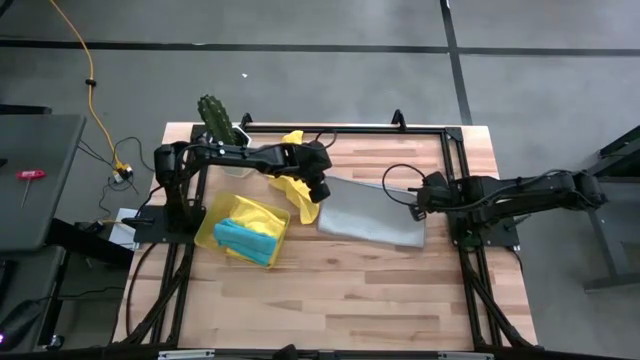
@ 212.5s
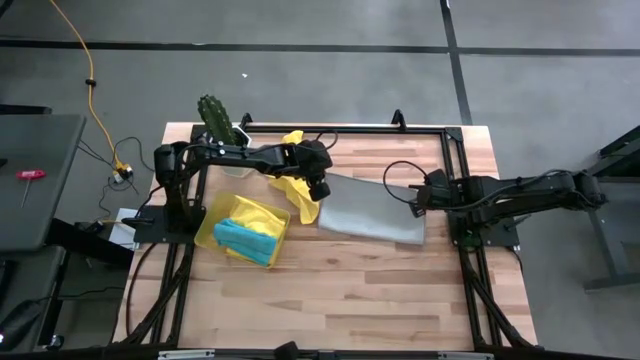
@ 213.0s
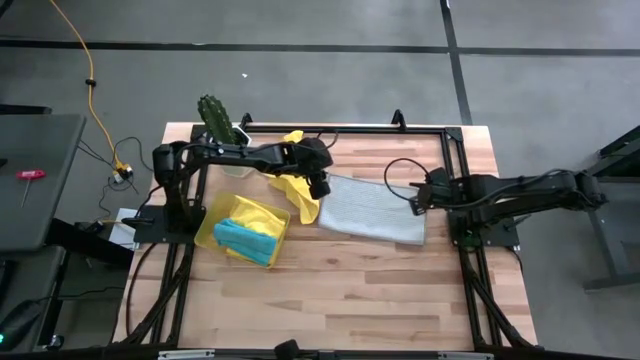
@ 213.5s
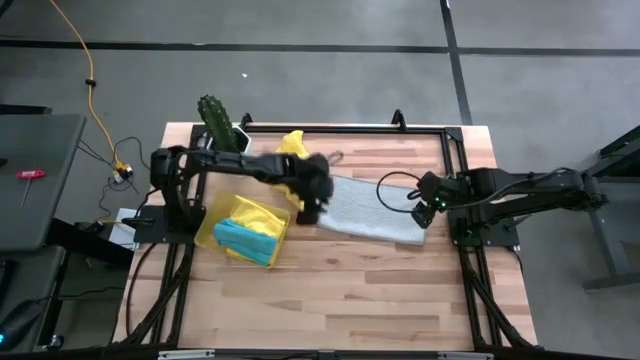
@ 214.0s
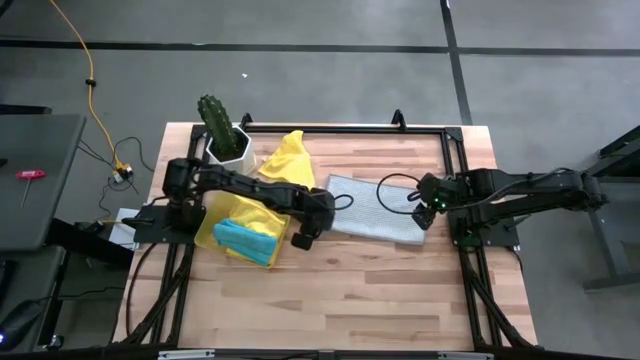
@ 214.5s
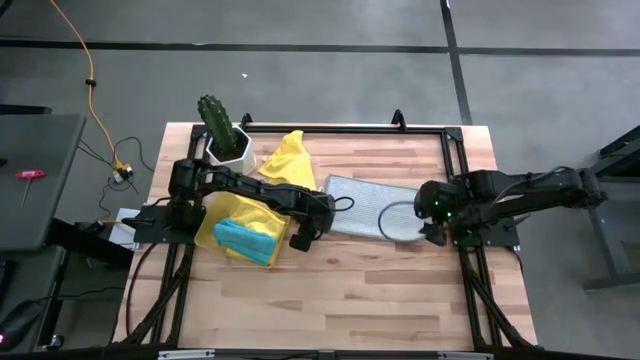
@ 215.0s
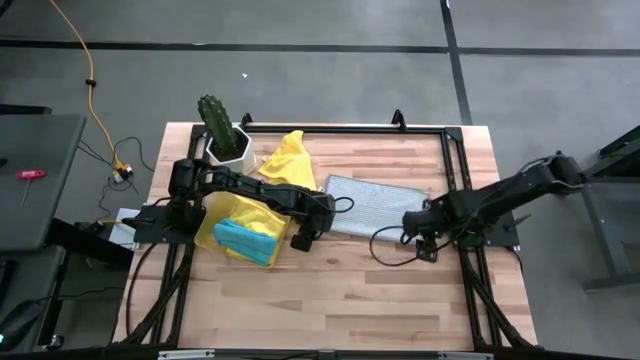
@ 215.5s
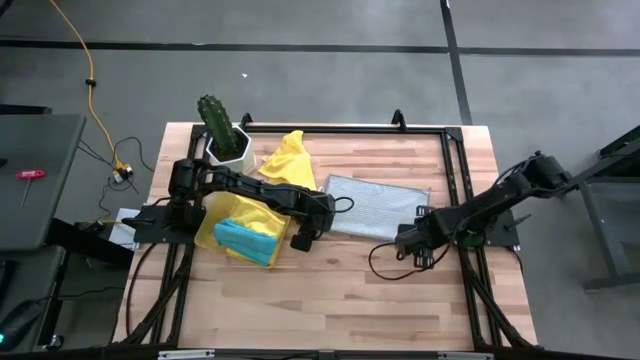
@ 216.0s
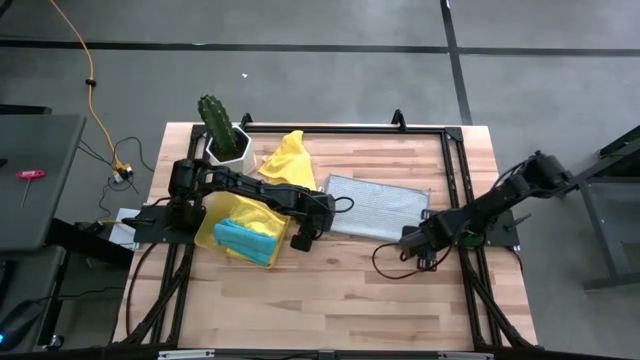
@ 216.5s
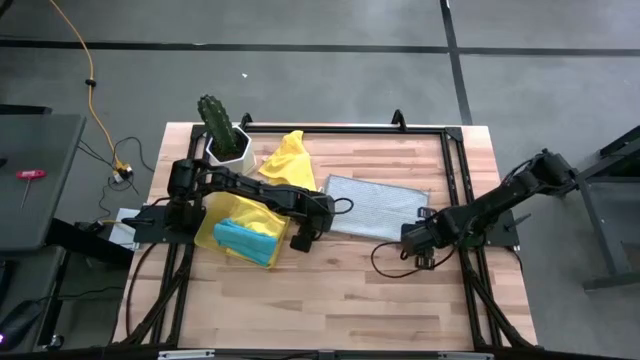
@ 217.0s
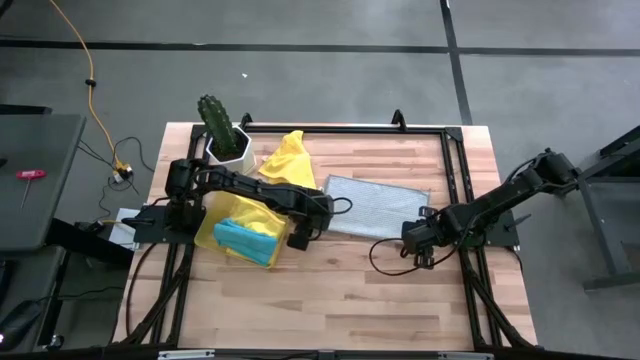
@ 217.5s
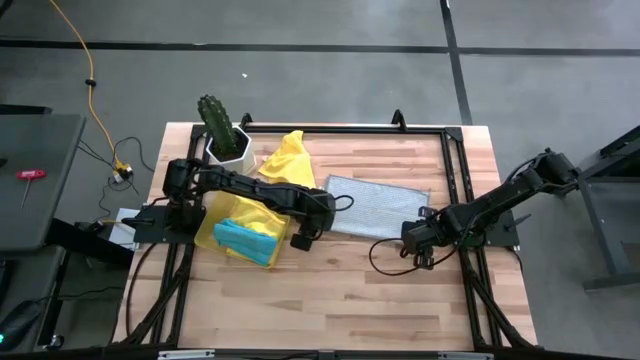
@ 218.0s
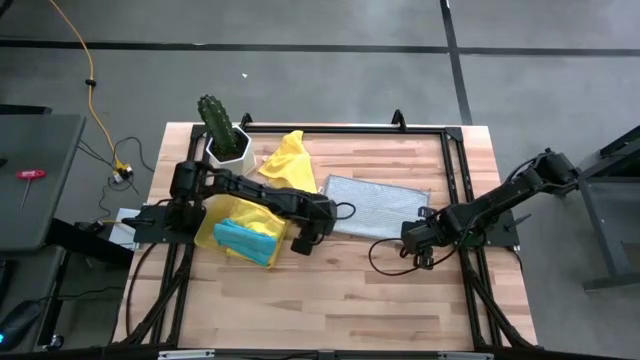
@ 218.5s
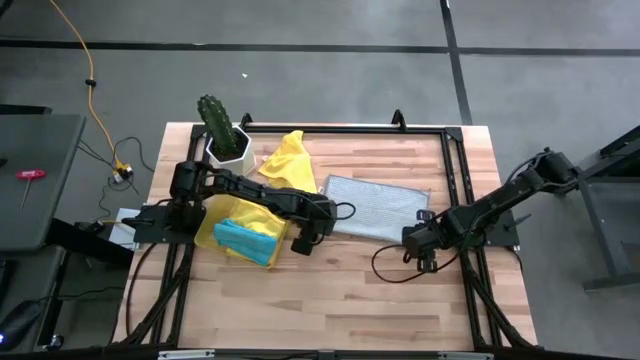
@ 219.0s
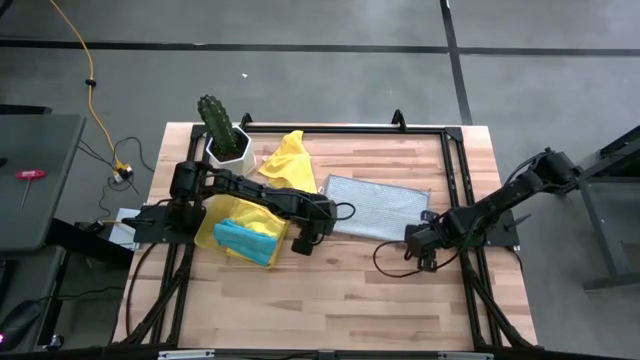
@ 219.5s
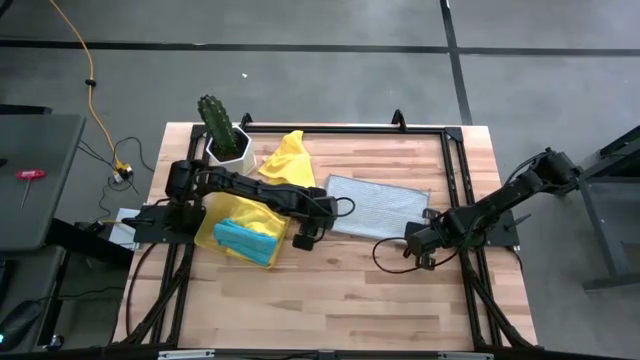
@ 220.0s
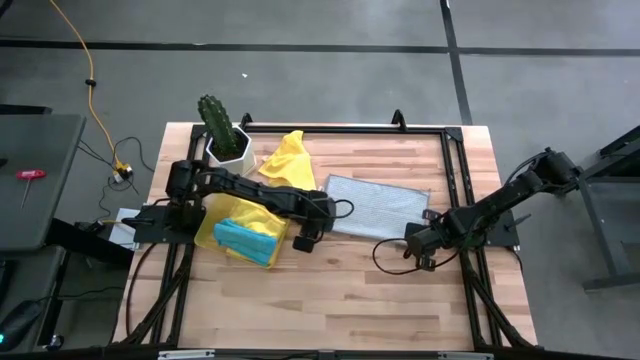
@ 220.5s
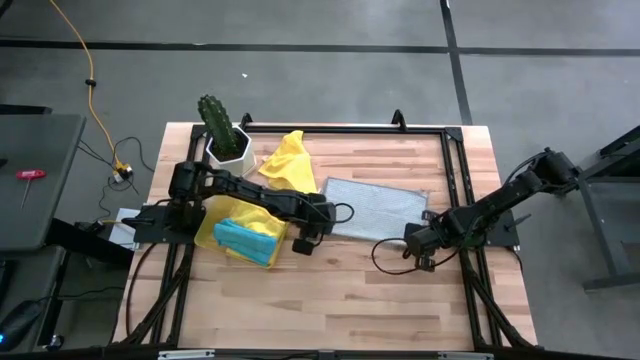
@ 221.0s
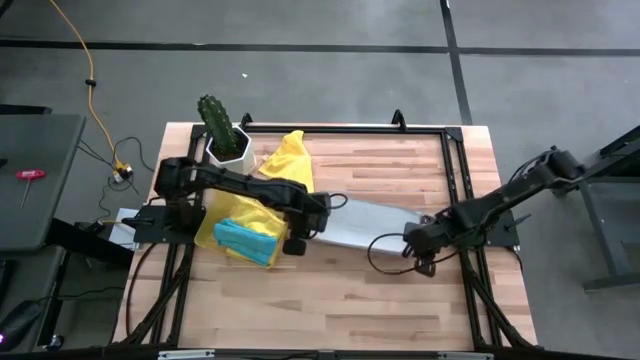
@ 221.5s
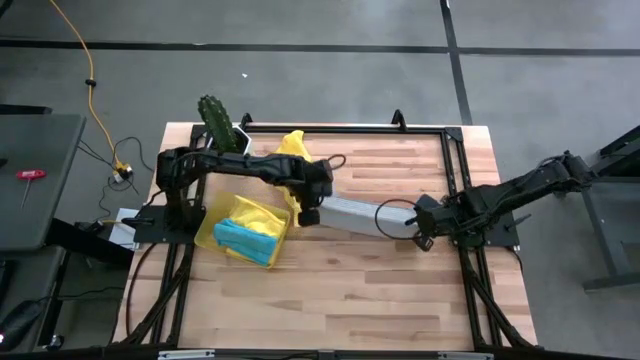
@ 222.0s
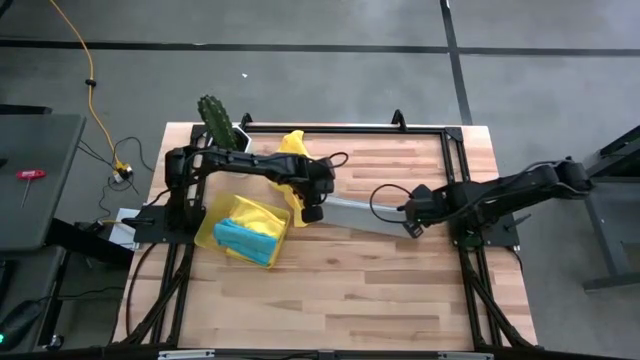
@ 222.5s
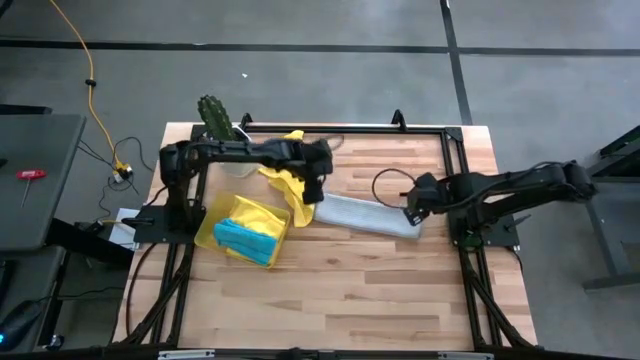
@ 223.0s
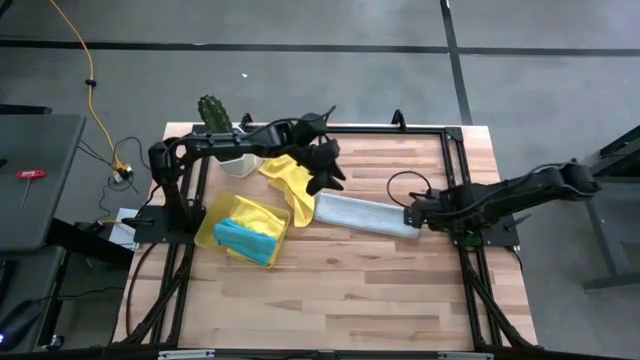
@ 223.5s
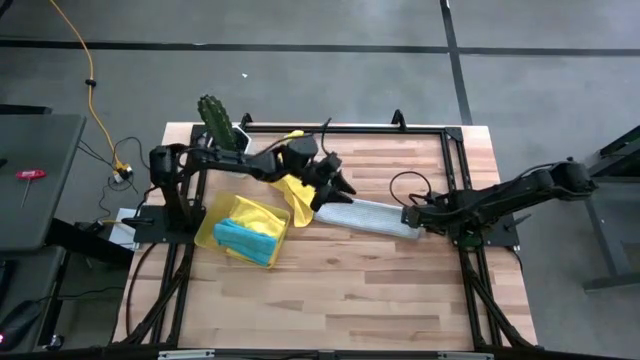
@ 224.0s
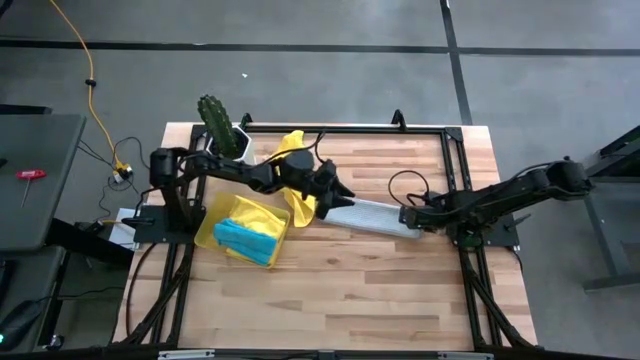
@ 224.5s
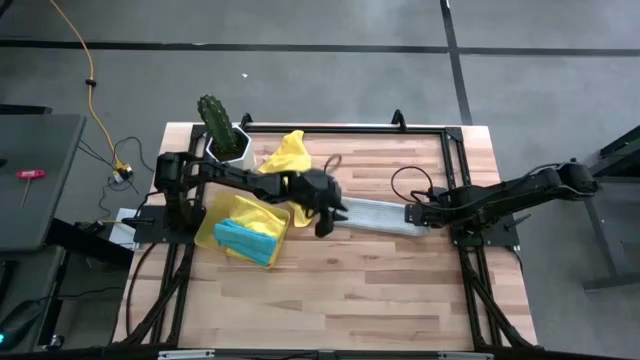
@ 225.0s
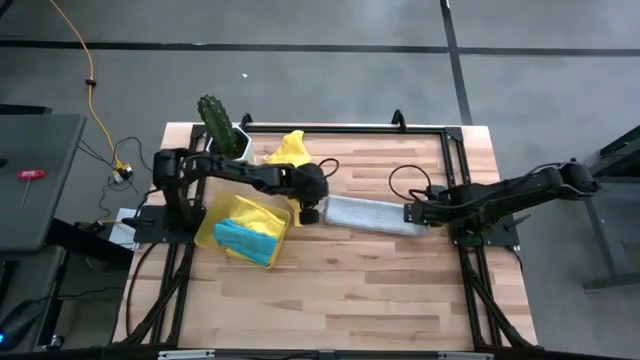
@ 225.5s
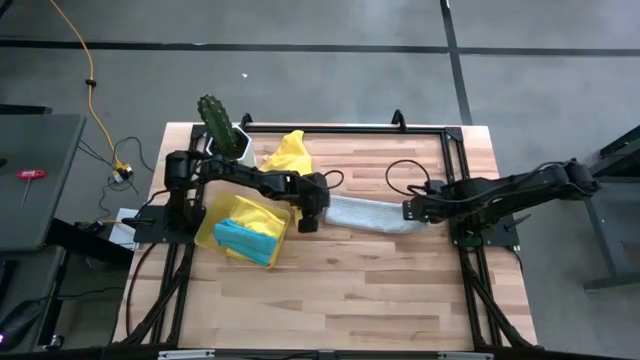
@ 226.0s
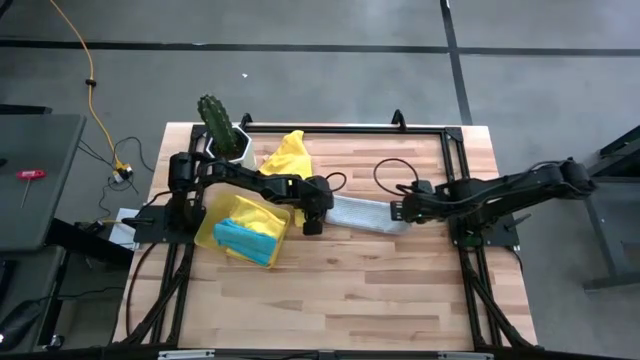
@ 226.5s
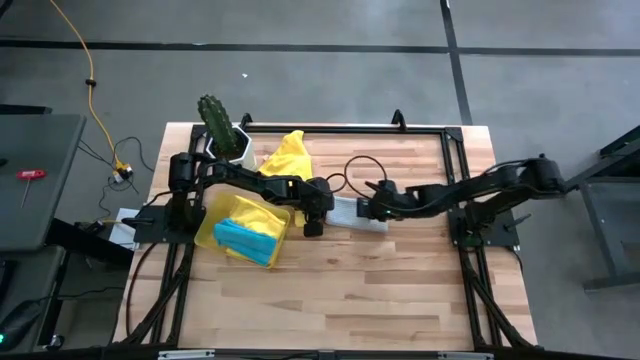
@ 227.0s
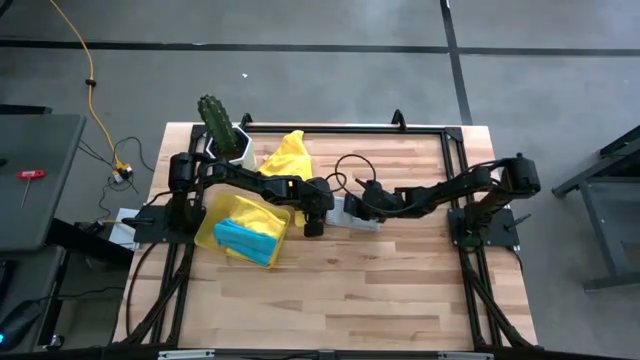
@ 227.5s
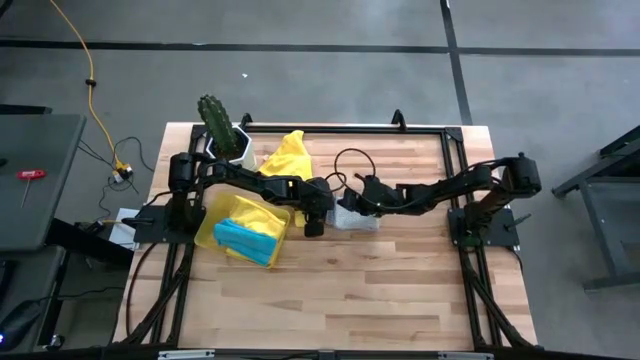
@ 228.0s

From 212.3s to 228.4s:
Task: Fold microfiber towels
Fold the gray microfiber towel

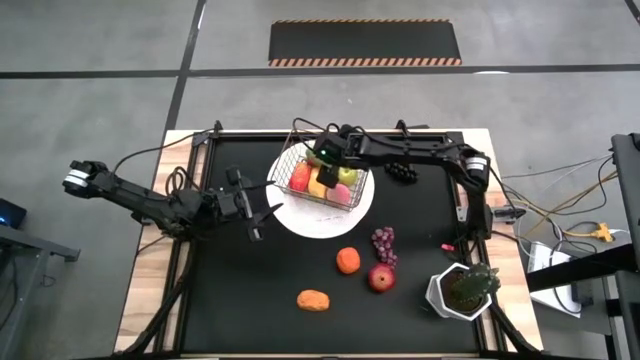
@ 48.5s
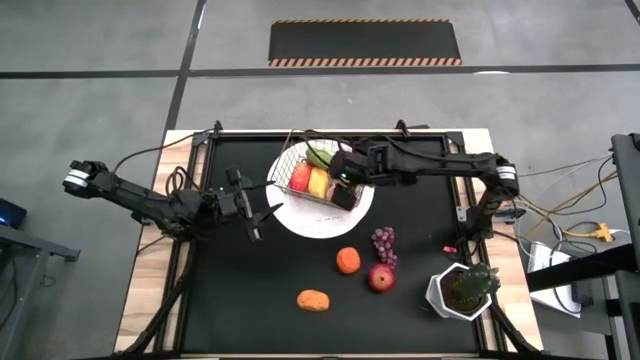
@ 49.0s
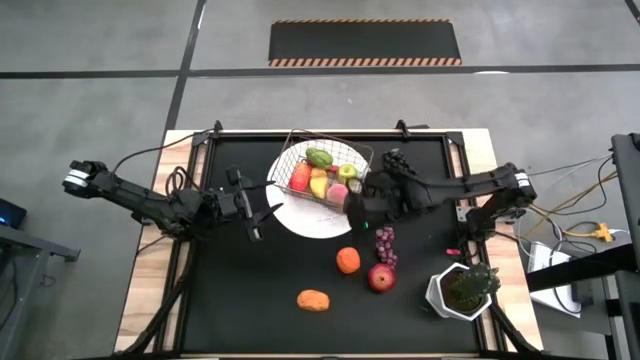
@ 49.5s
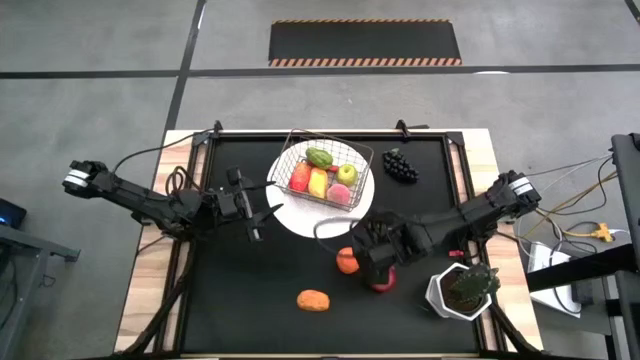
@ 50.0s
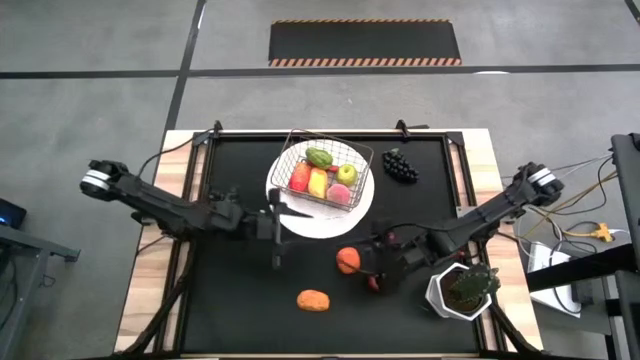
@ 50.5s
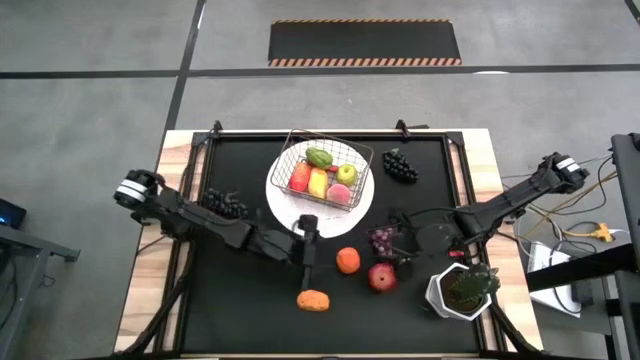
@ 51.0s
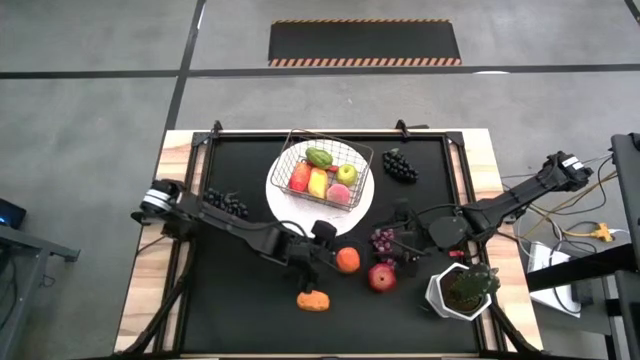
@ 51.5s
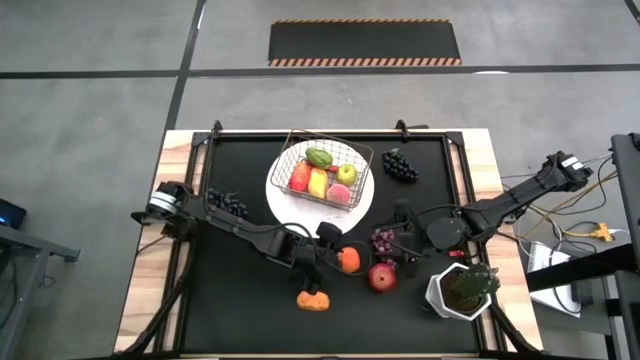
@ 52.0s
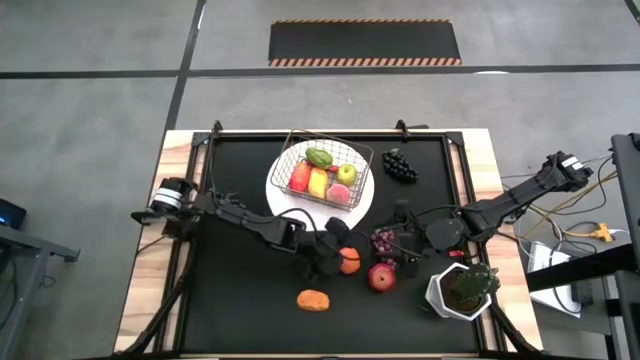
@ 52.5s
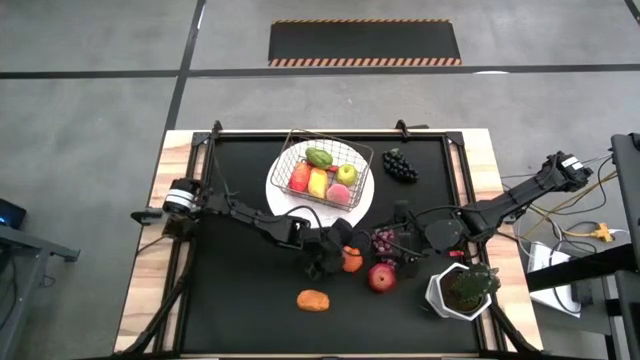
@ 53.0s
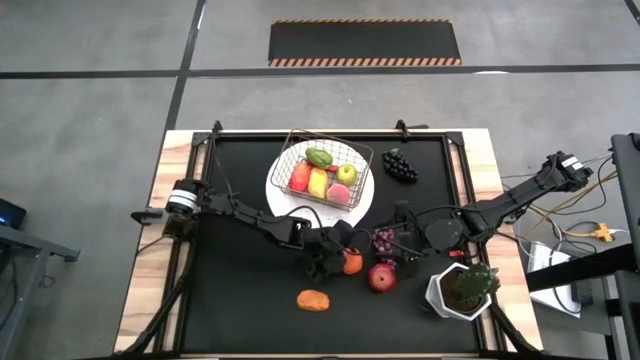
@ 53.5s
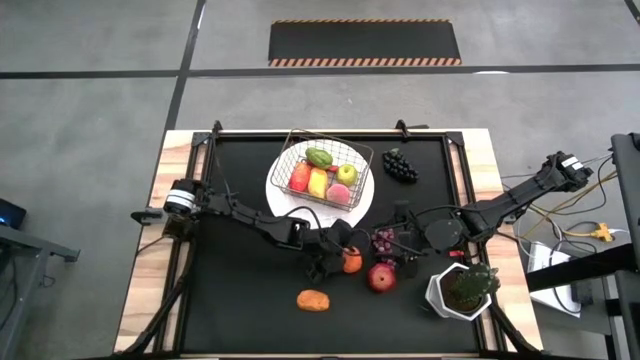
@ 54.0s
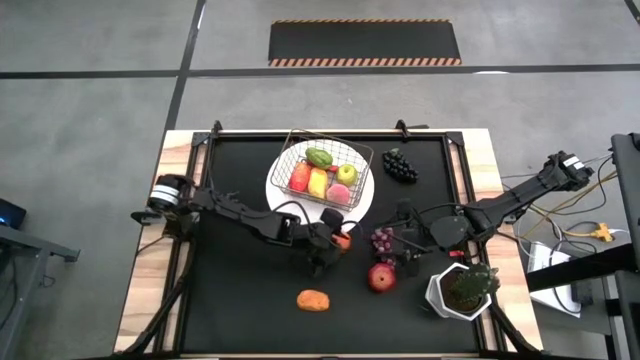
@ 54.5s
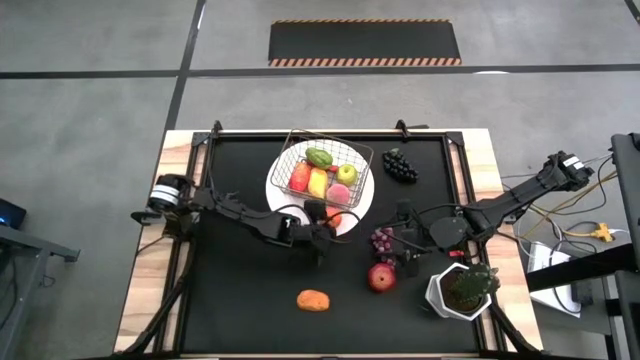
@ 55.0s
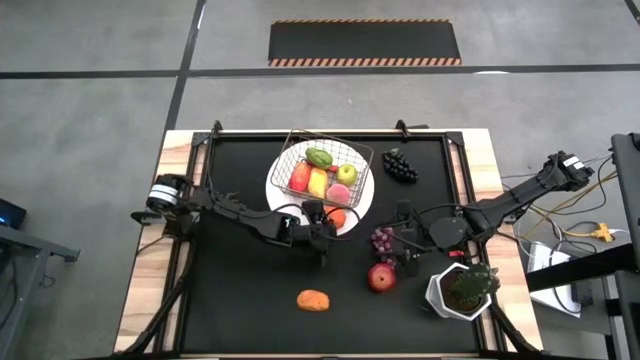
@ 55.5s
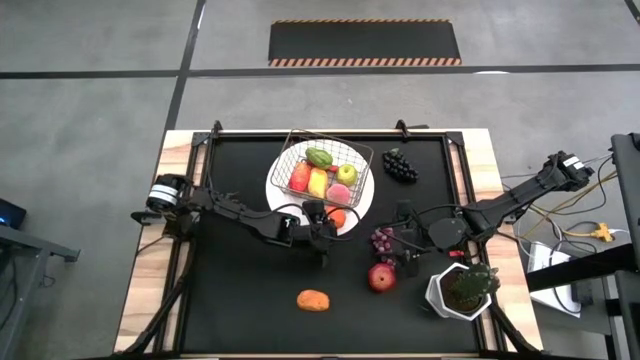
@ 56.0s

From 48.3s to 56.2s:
Task: Build produce basket
Put the orange into the silver basket
